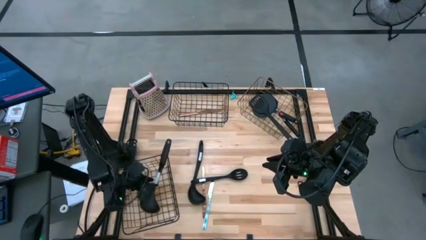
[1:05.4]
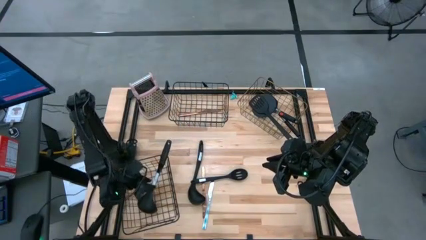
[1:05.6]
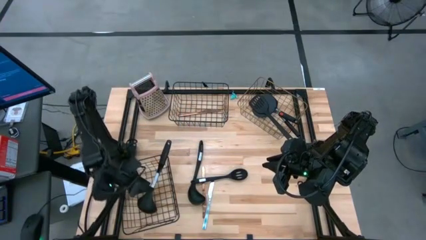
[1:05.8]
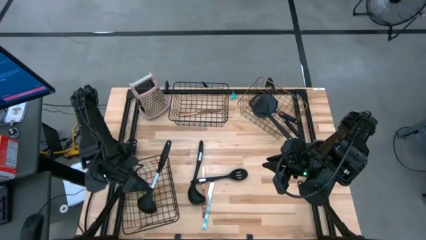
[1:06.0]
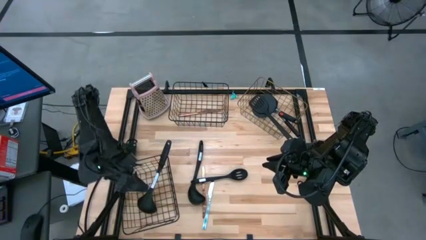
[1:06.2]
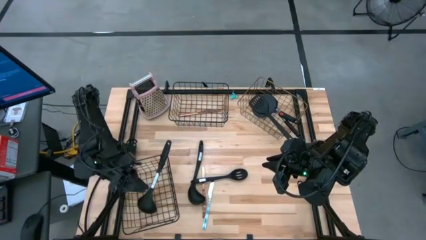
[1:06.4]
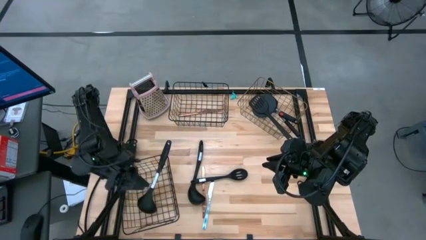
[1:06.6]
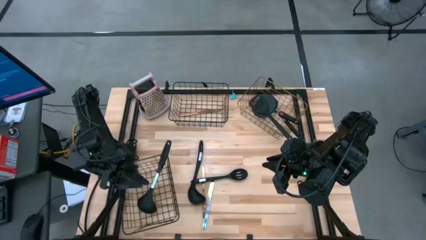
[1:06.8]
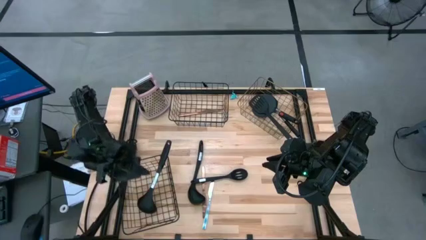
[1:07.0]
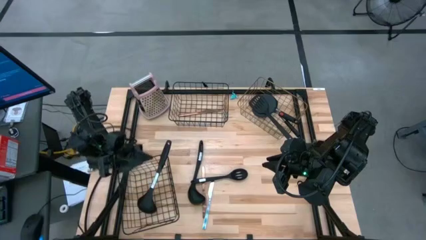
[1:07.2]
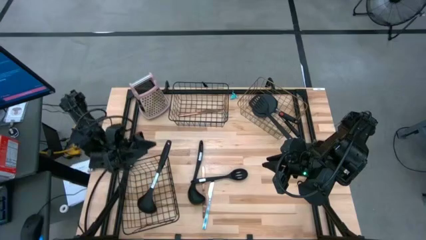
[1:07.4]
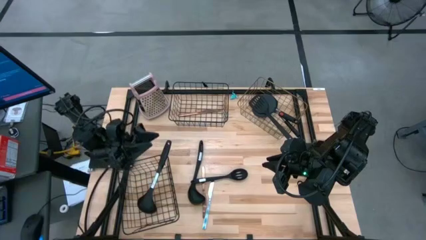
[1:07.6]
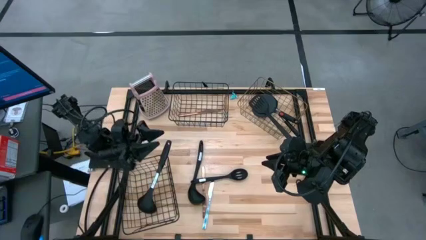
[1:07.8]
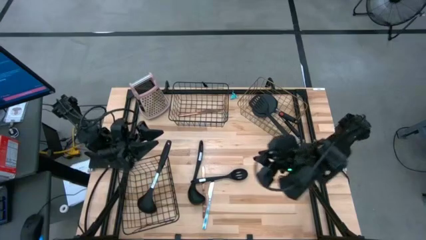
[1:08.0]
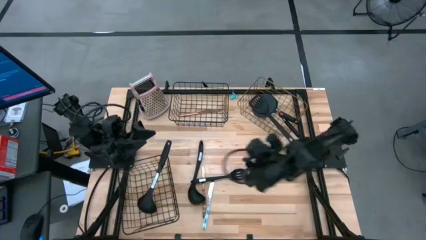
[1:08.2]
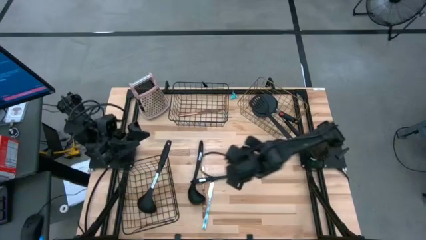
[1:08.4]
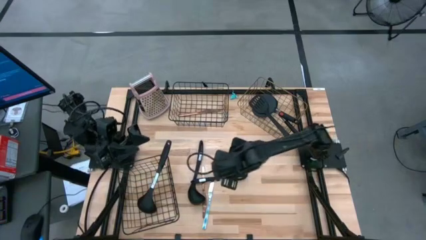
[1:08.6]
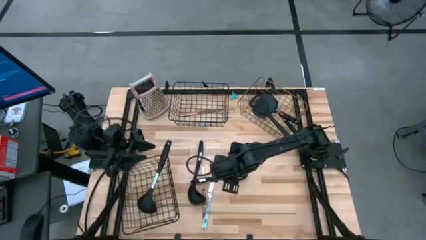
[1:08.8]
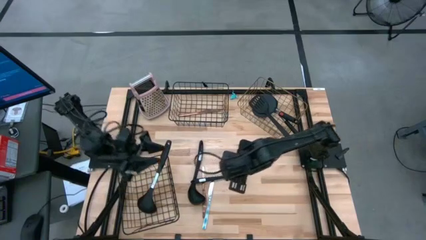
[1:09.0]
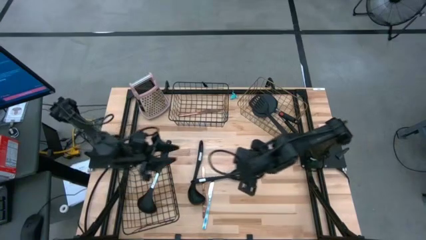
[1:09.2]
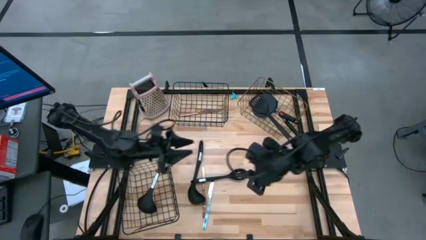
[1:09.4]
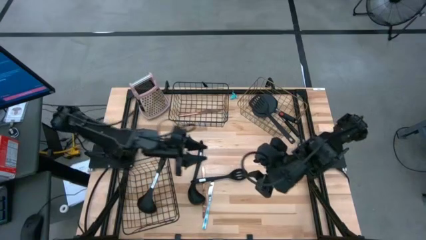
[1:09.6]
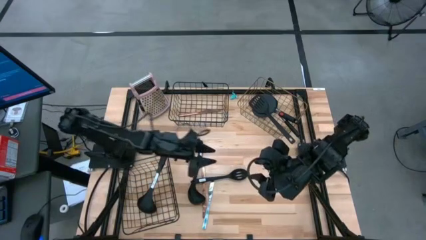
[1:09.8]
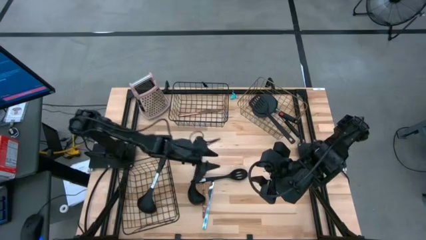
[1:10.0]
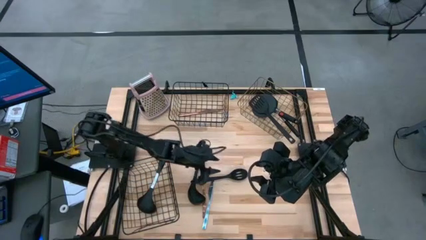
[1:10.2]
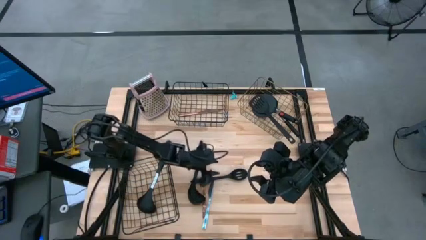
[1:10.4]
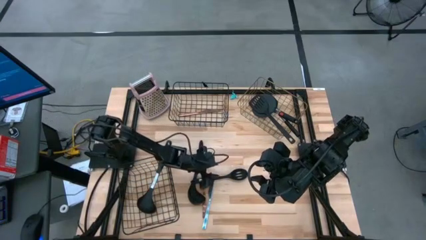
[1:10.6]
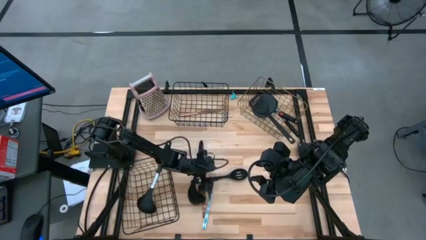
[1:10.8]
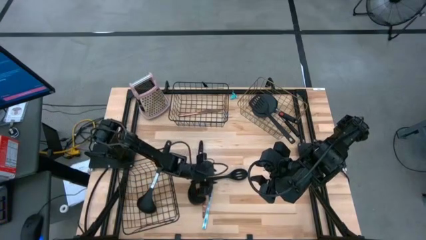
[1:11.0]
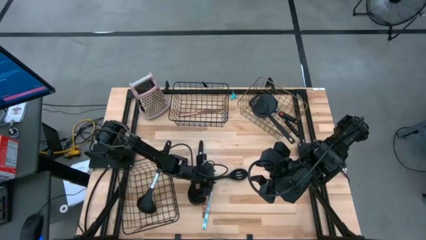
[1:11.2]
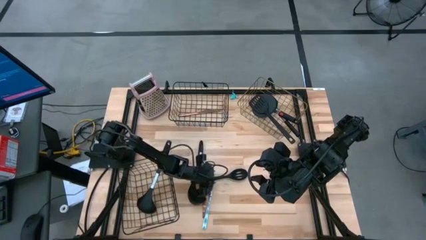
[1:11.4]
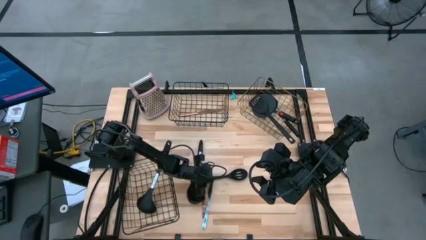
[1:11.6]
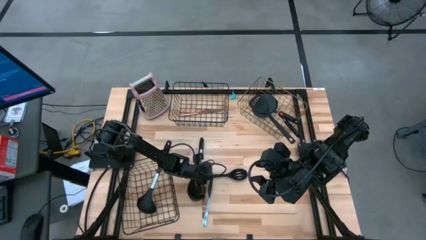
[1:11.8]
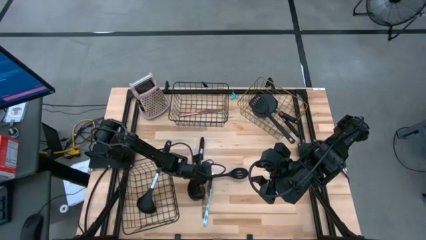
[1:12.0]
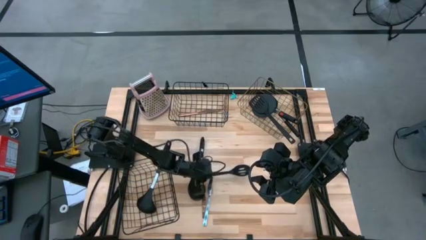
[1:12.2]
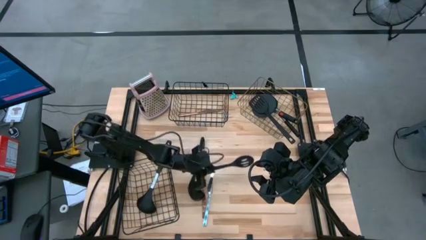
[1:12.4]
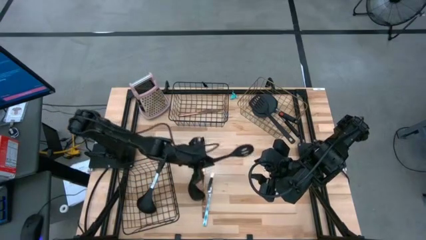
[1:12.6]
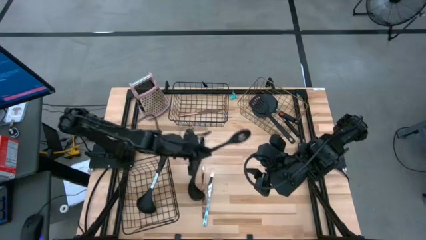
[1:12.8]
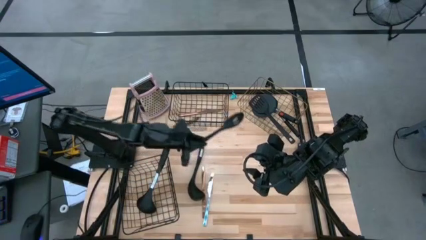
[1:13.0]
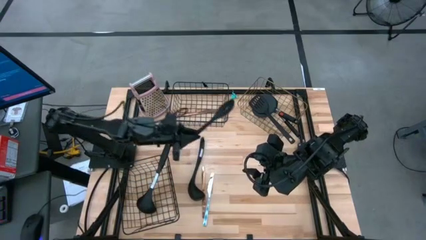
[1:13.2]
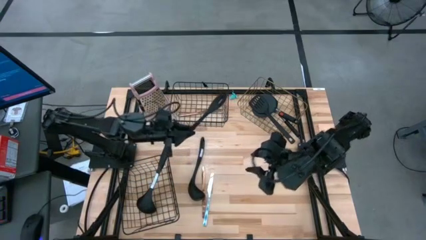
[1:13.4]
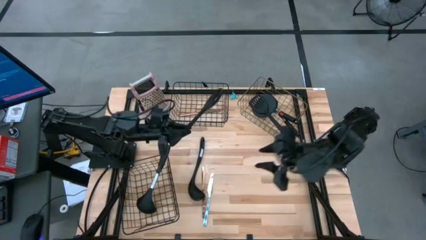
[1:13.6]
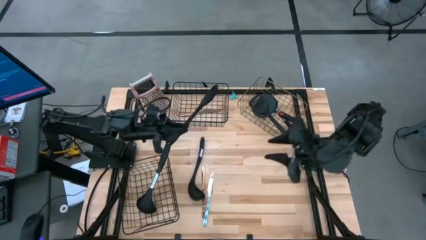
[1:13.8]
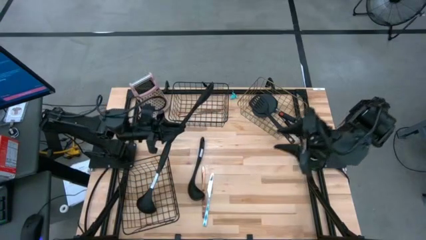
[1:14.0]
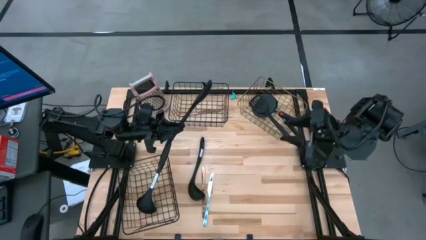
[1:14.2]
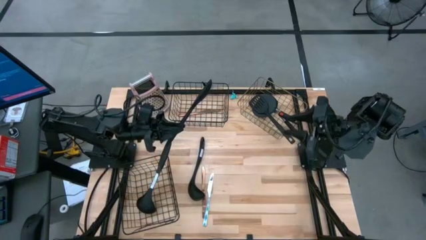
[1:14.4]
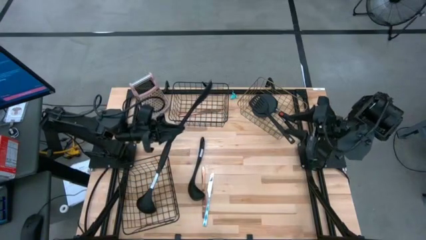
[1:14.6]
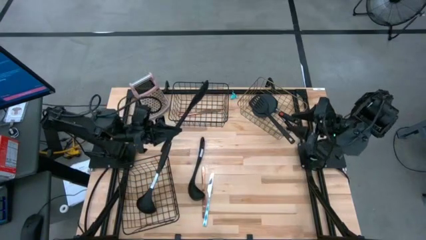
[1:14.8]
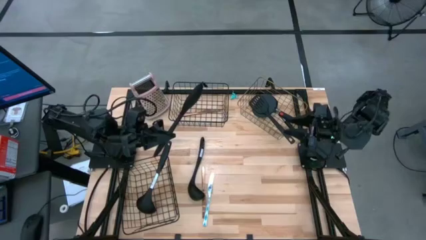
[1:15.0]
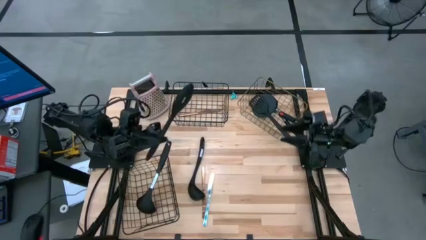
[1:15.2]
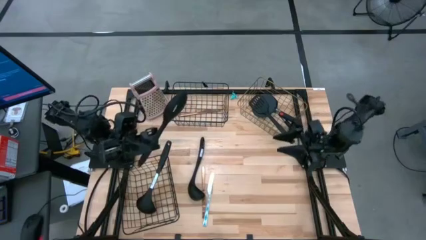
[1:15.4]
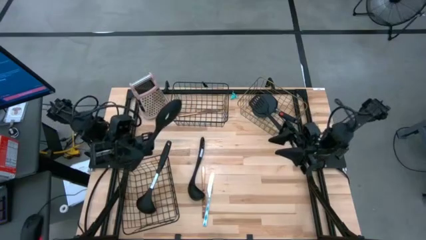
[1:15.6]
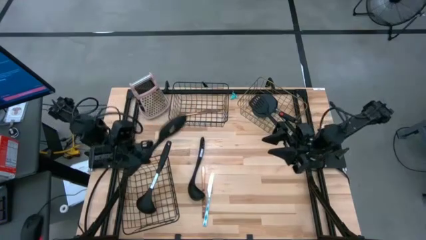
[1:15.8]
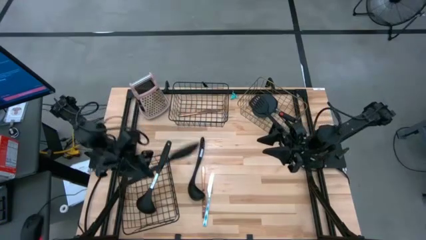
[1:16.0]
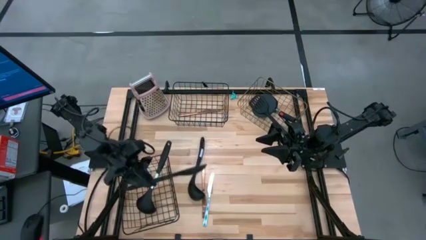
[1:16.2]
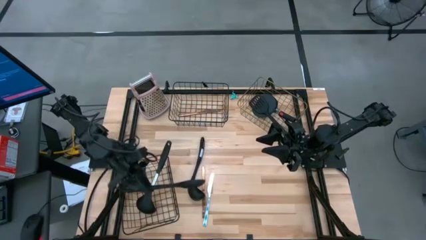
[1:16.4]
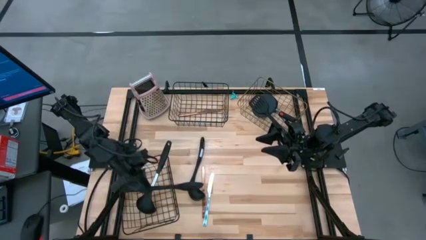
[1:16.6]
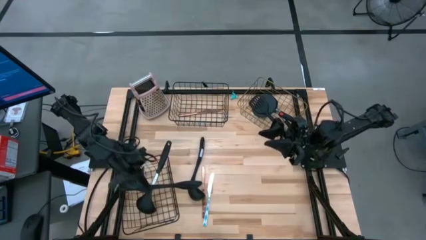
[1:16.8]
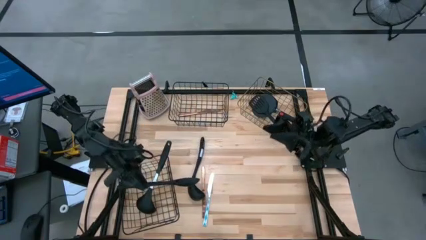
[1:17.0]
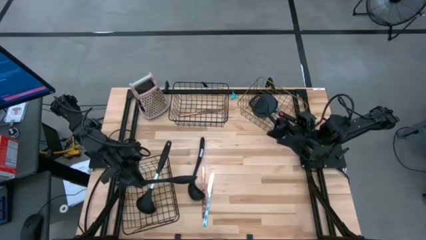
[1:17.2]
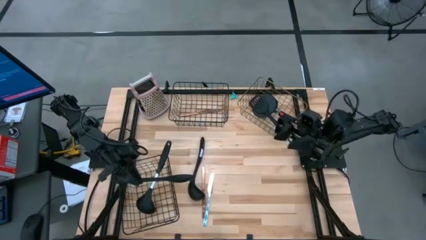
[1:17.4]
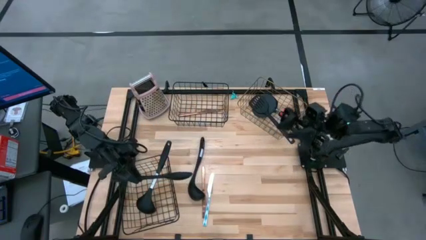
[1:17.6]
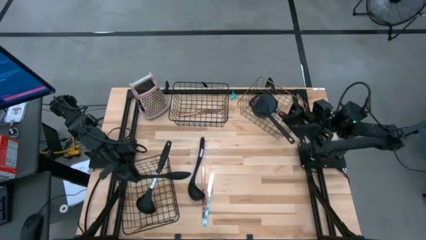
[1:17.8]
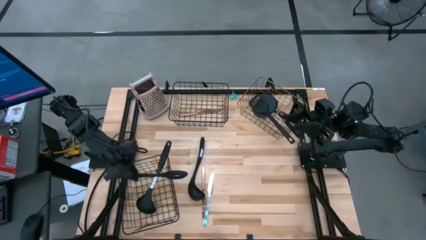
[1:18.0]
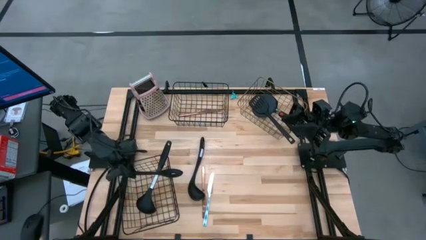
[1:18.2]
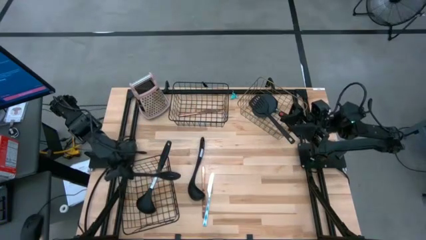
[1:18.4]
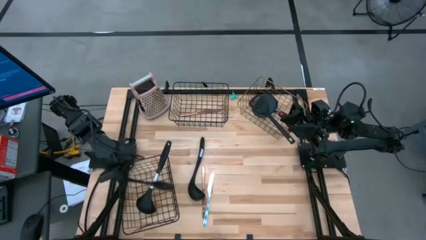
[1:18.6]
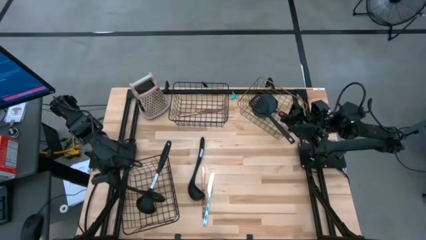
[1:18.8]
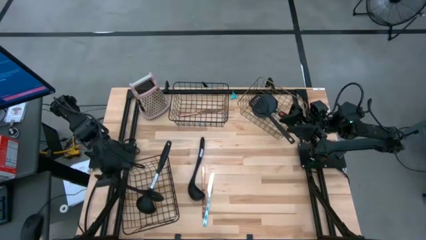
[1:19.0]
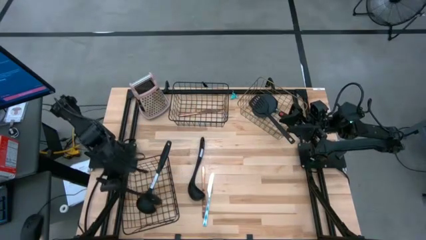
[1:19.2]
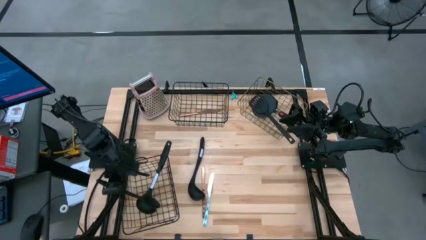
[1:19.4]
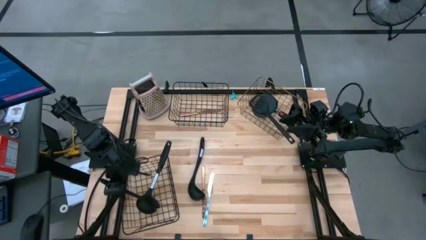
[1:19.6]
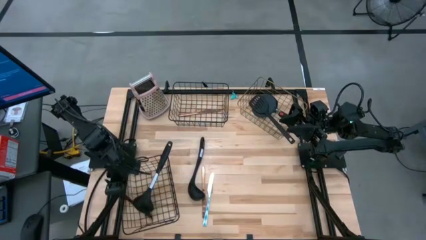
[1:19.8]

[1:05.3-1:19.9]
Task: Pick & Place Kitchen Items
Put the black serving spoon into the bottom black wire basket

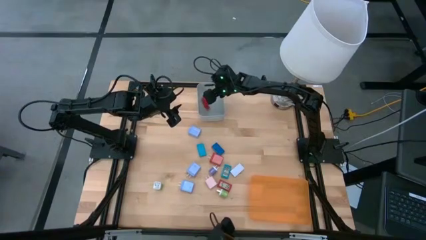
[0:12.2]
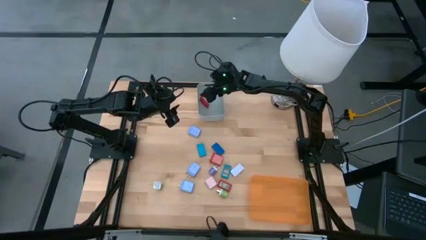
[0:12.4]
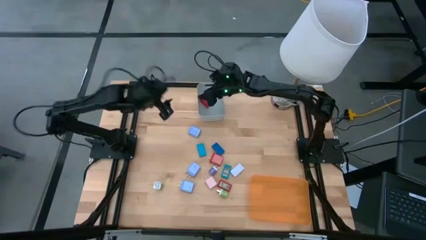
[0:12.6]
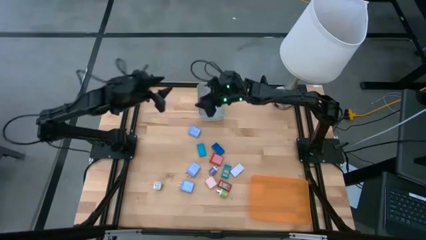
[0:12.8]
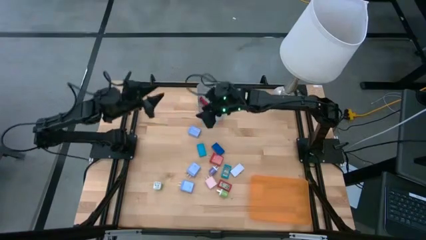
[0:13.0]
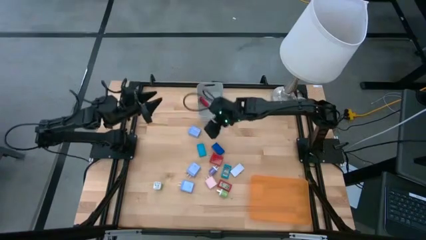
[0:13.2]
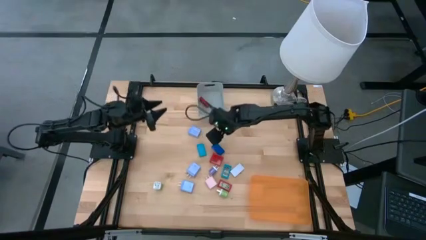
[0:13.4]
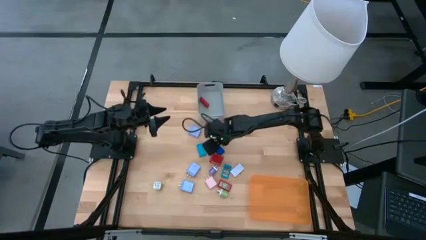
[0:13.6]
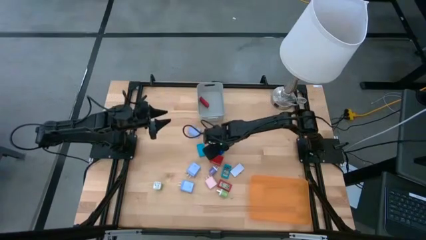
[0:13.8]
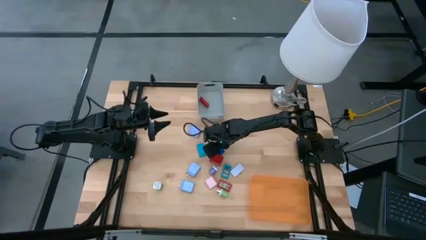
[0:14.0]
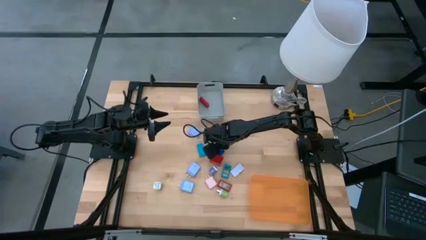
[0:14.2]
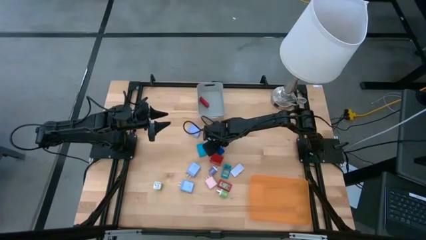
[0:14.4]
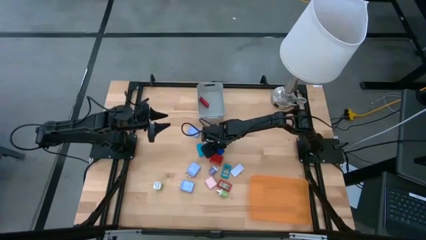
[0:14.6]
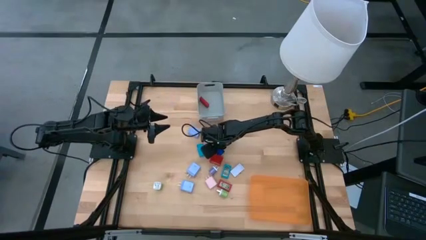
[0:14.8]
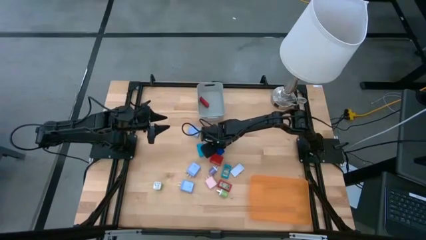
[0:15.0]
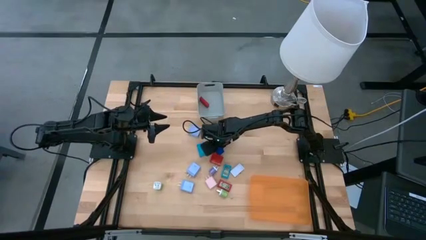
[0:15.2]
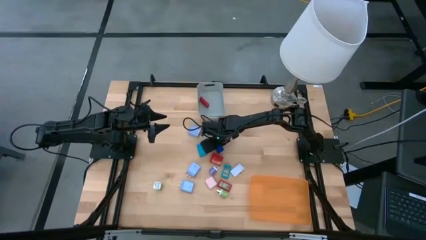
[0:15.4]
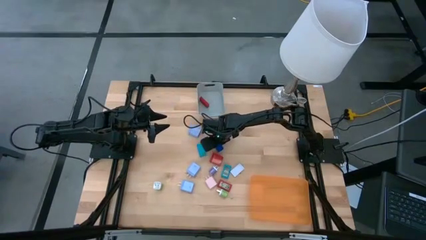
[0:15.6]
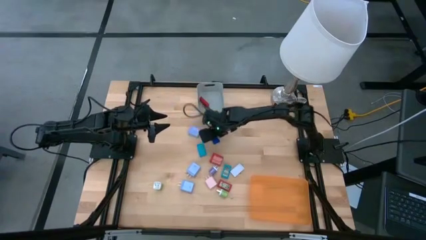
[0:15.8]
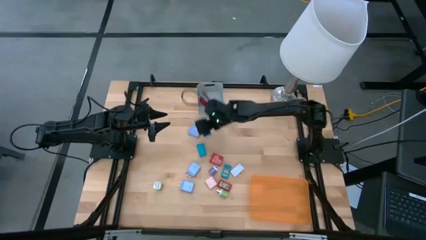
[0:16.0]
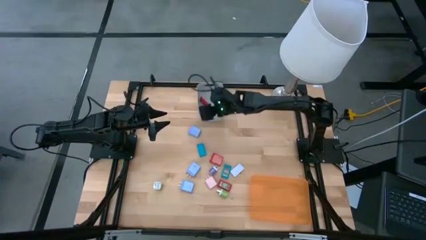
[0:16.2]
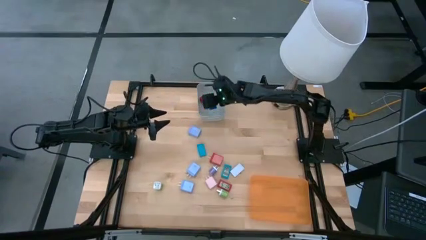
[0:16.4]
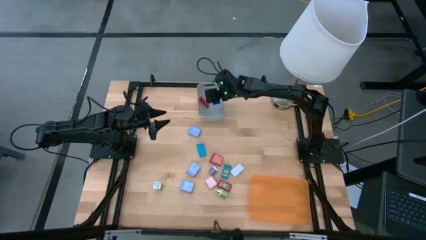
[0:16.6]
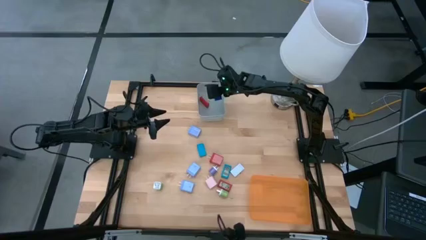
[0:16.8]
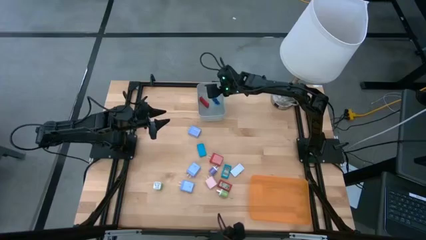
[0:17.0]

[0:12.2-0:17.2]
Task: Pick & Place Office items
Put the dark blue digital timer into the gray bin
